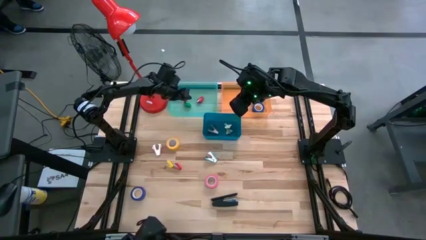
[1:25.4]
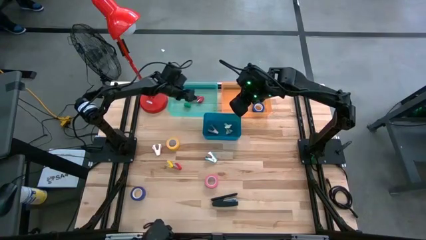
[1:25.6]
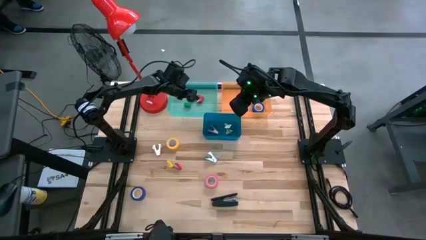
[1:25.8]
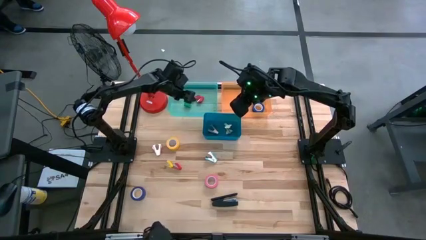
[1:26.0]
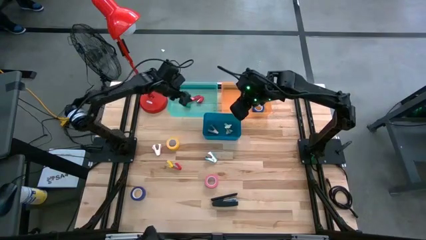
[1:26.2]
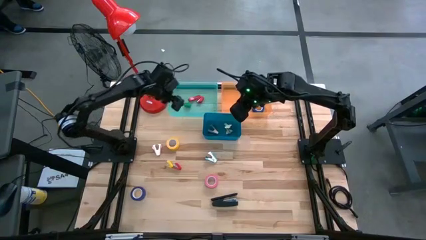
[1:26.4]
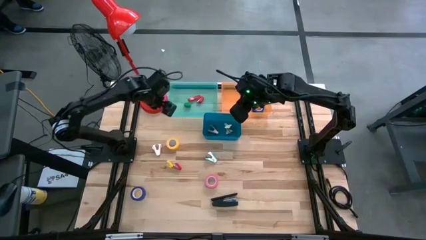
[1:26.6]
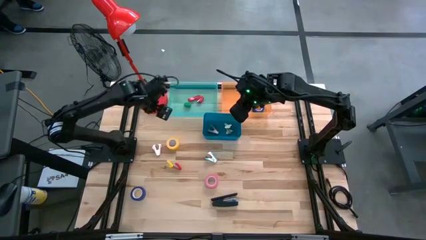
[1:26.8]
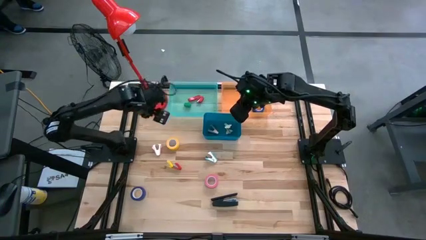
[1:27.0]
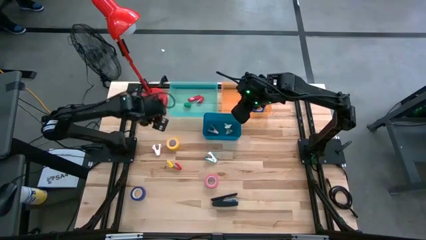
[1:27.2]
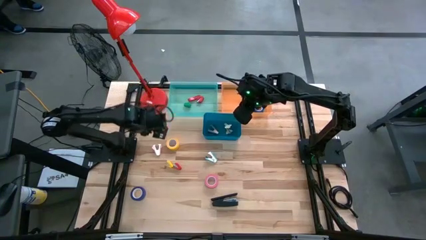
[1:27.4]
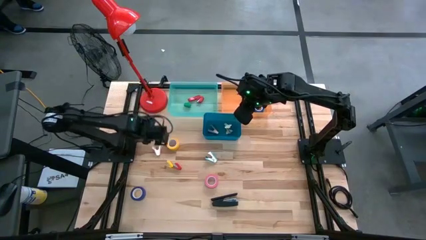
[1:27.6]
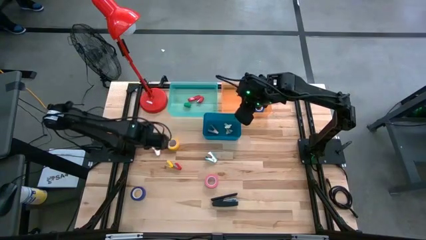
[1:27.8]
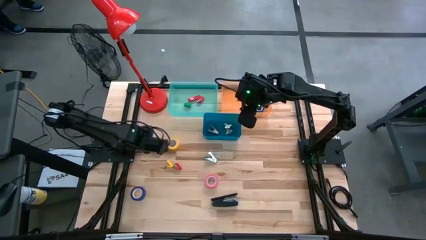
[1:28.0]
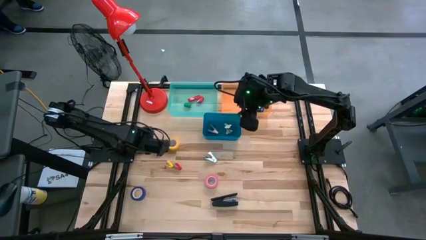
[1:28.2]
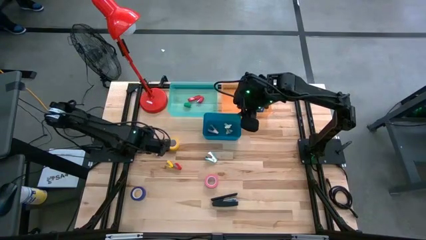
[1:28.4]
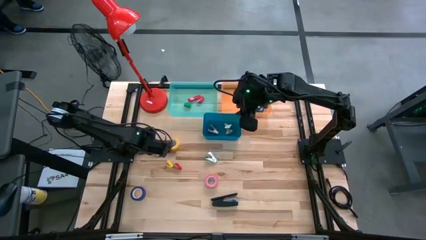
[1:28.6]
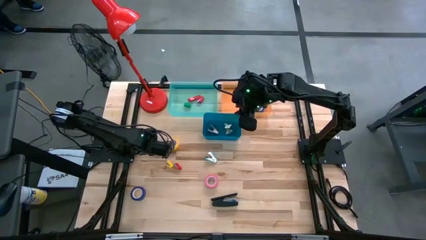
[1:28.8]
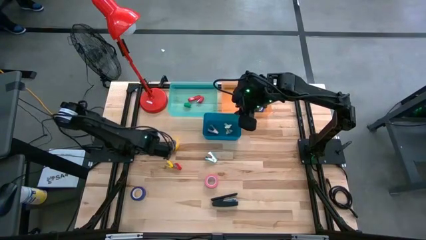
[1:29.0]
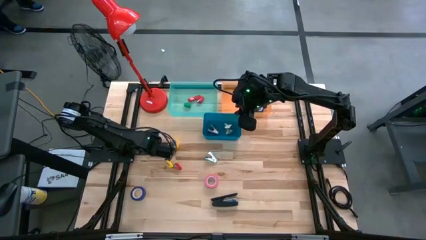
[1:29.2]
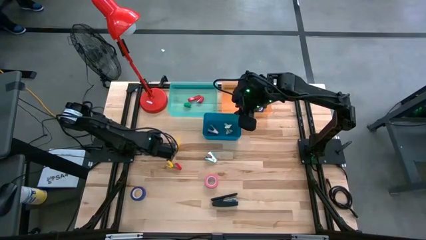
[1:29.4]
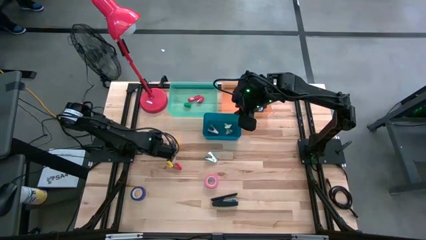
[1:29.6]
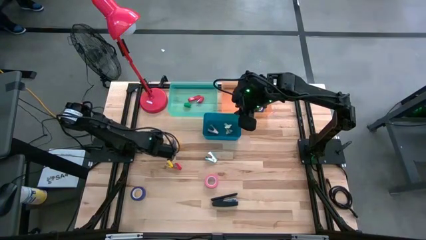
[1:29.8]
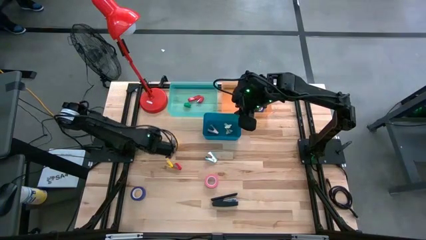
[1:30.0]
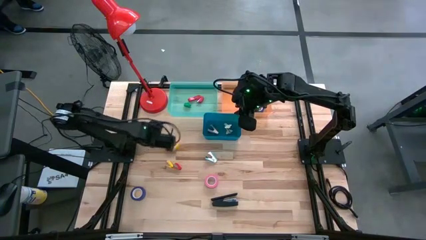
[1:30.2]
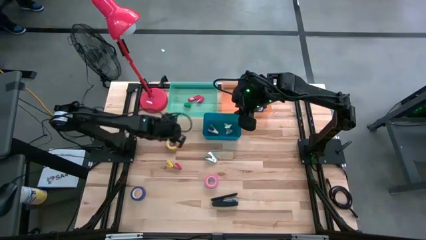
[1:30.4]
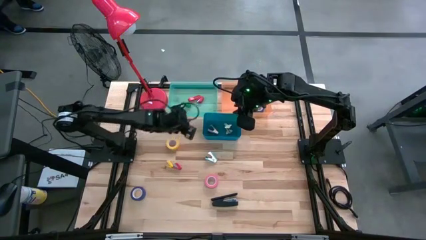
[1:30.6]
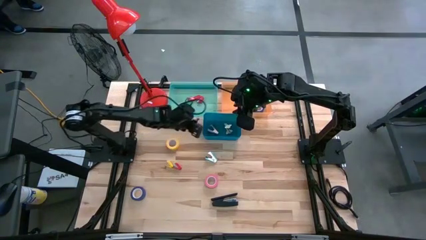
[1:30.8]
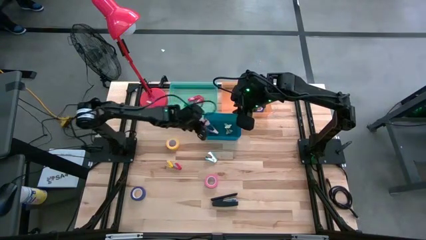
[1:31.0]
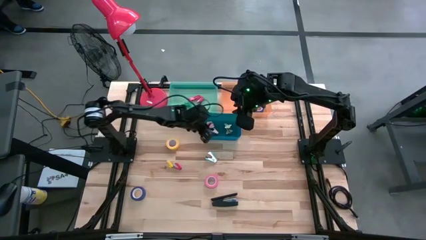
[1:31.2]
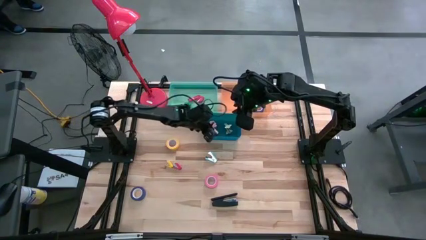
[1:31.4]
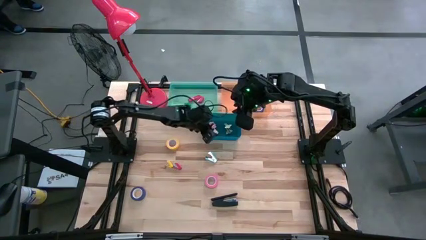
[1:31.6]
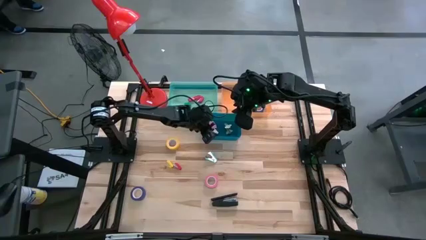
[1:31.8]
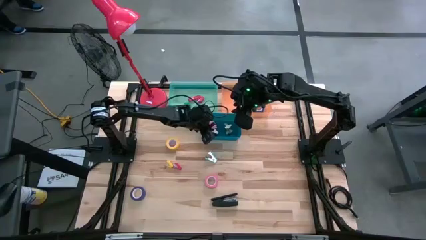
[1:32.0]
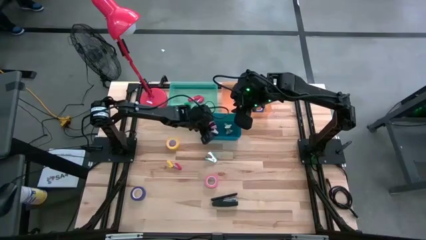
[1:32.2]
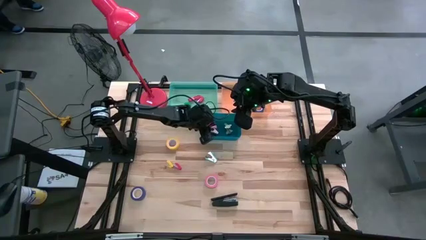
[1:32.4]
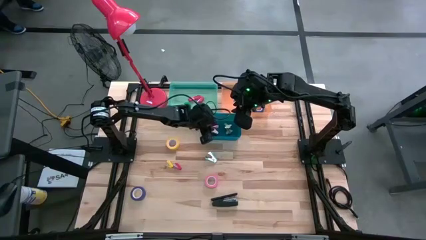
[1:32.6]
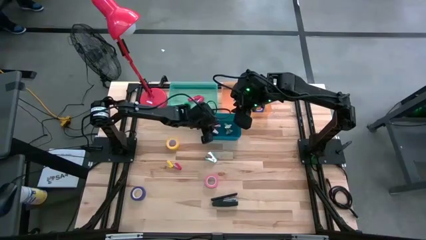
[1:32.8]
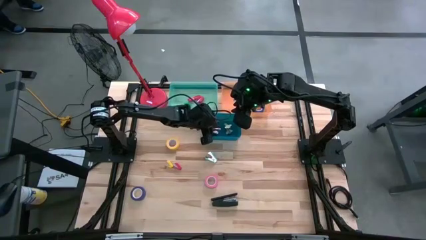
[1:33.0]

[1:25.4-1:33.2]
Task: Pick and place Stapler, Stapler remover, tape
Put the pink staple remover into the blue bin

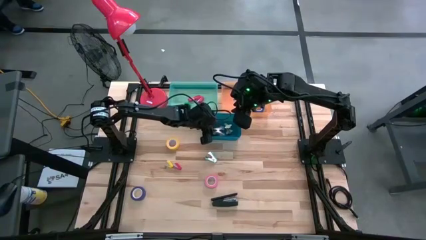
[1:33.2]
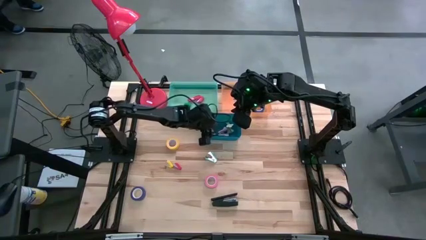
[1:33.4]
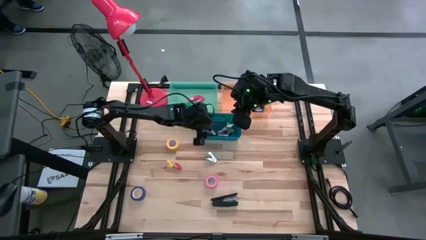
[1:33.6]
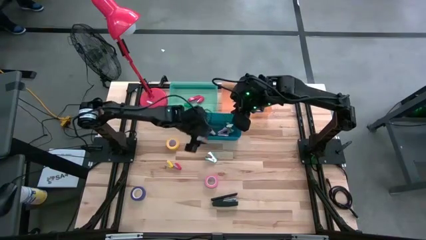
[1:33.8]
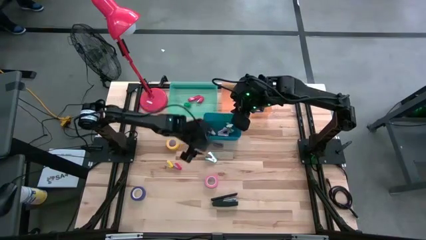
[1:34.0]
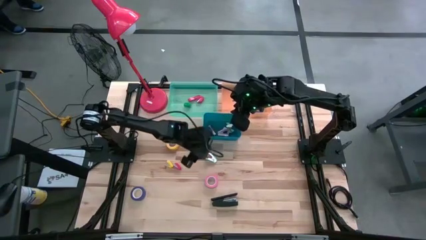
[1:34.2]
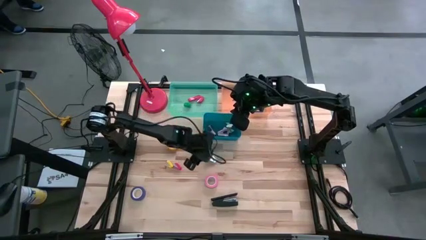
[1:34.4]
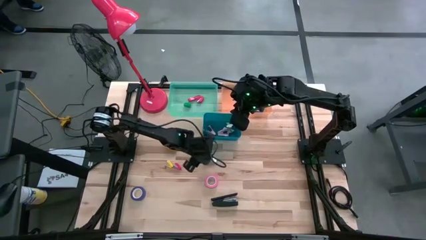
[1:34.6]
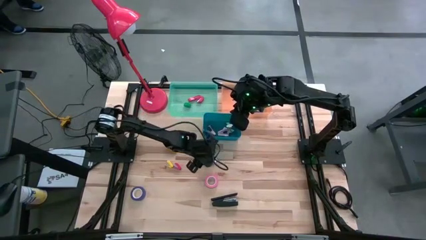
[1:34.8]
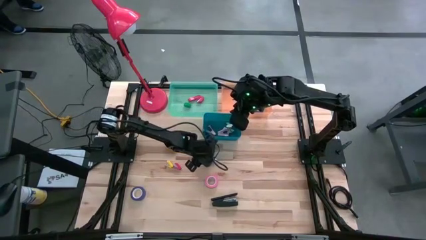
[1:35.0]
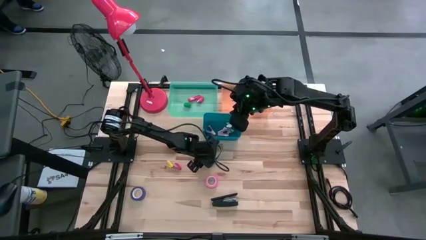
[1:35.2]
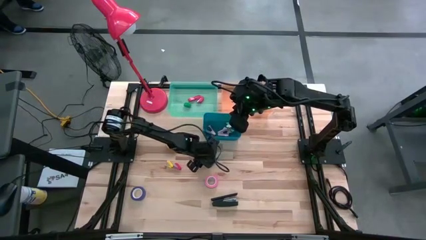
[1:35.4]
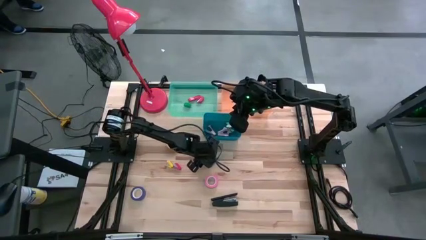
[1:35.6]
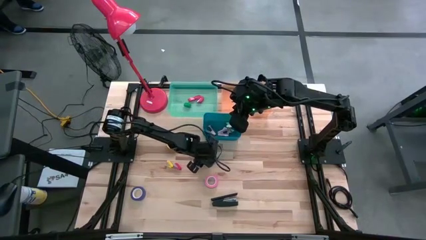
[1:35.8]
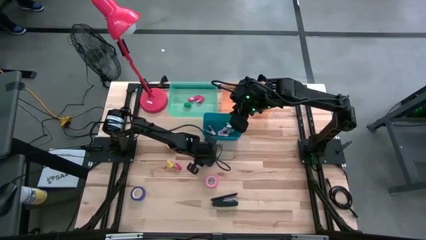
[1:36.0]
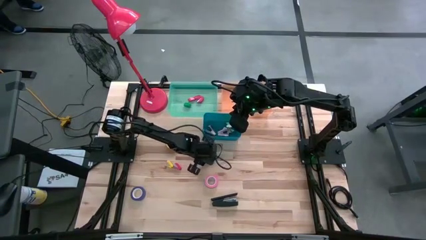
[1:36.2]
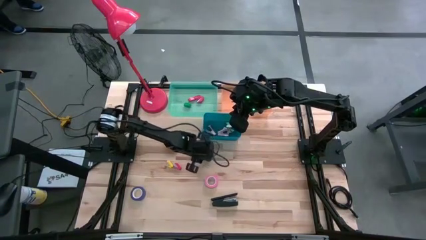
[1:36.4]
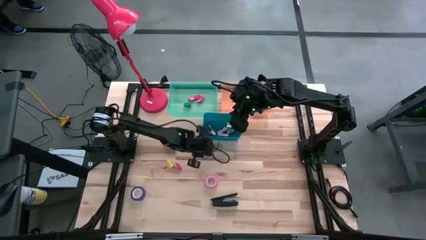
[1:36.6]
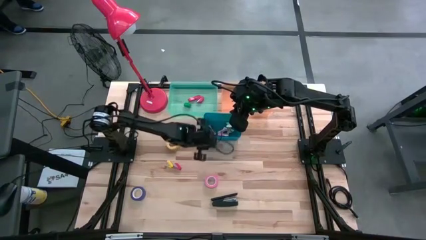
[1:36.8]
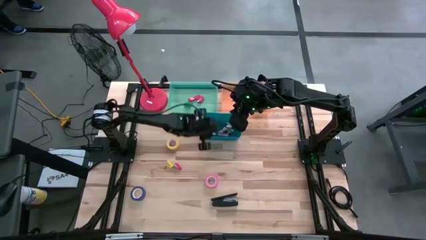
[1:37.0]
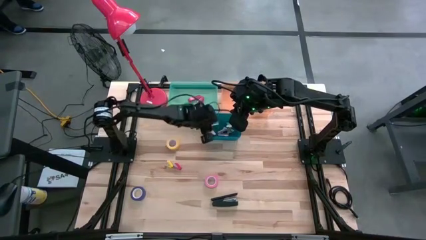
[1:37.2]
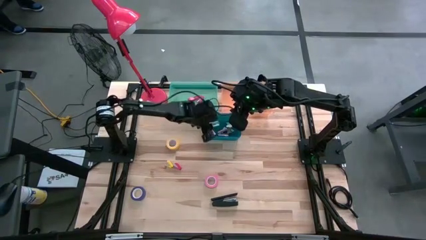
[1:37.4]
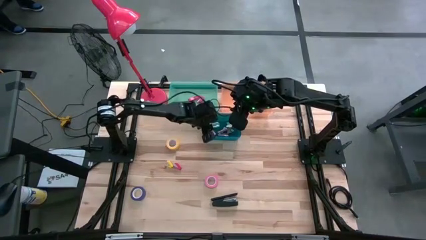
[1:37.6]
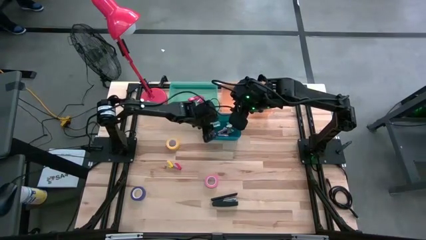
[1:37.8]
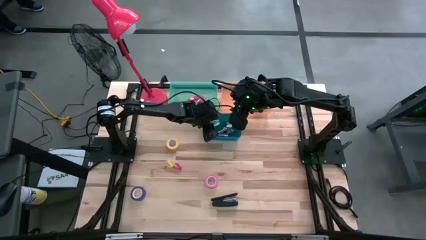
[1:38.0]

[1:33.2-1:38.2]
Put the light blue staple remover into the blue bin

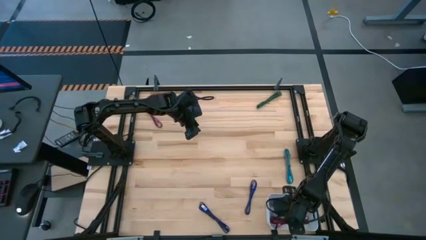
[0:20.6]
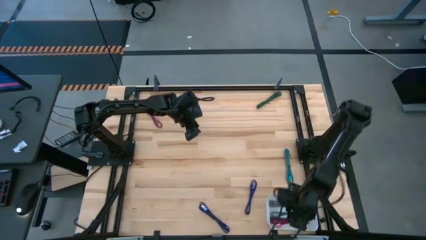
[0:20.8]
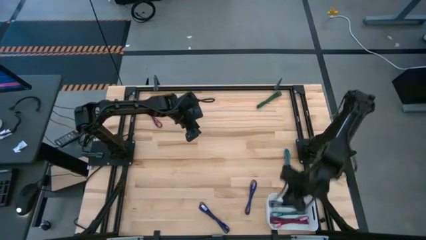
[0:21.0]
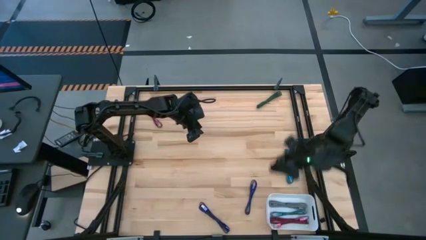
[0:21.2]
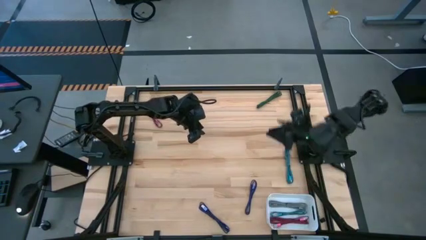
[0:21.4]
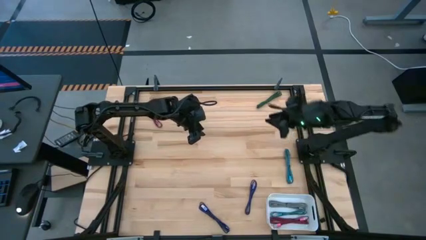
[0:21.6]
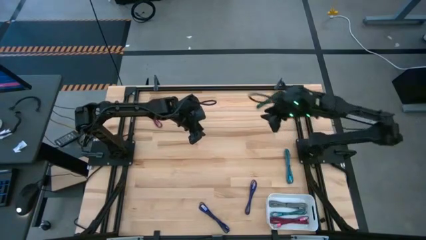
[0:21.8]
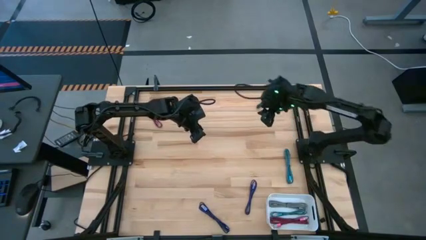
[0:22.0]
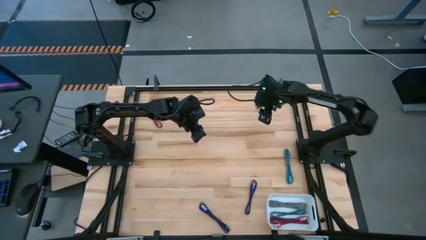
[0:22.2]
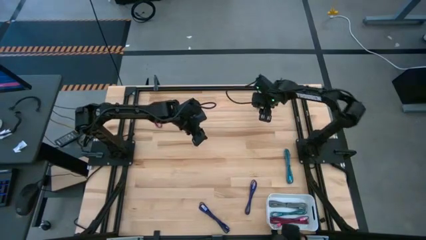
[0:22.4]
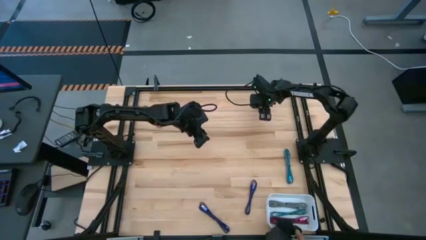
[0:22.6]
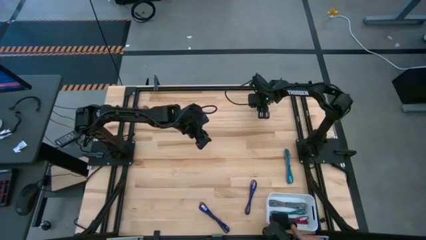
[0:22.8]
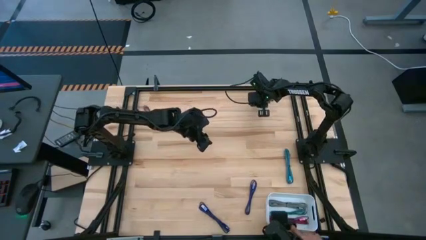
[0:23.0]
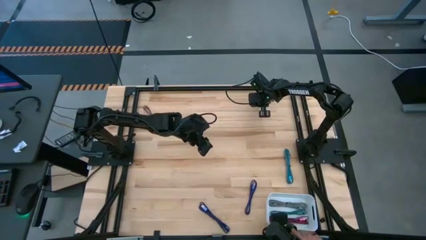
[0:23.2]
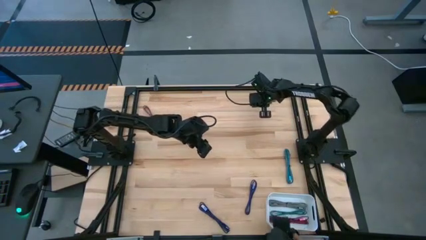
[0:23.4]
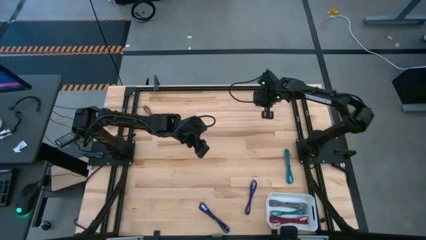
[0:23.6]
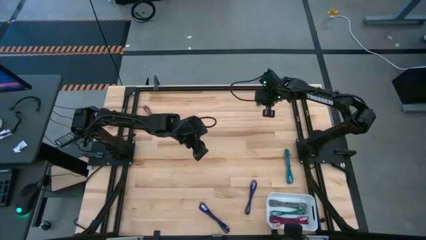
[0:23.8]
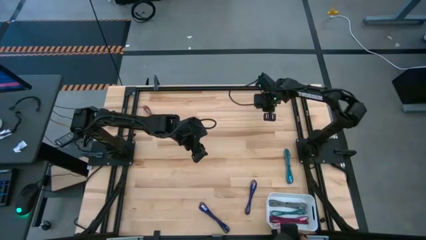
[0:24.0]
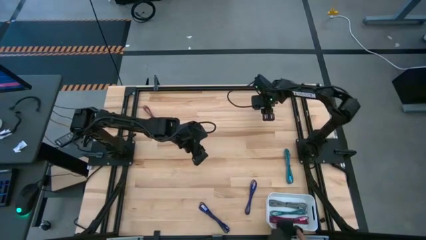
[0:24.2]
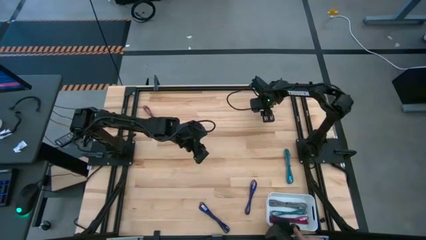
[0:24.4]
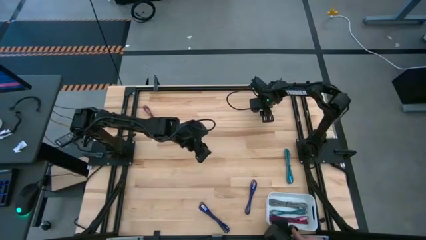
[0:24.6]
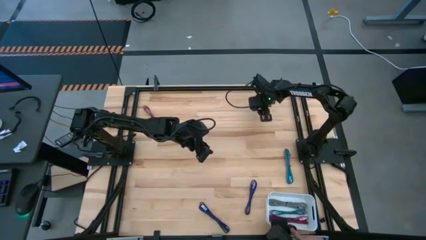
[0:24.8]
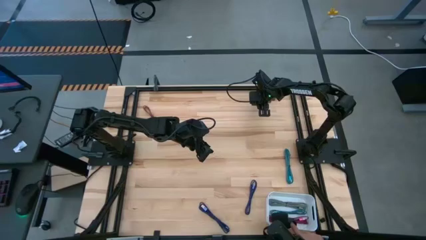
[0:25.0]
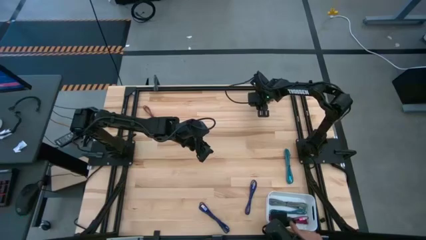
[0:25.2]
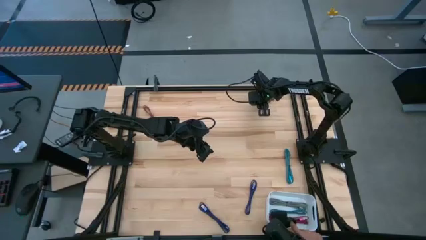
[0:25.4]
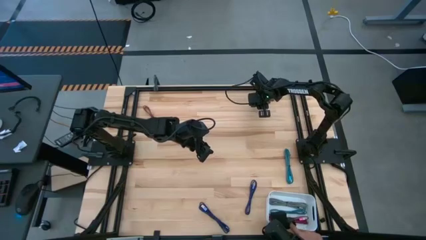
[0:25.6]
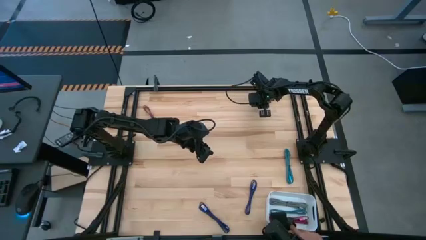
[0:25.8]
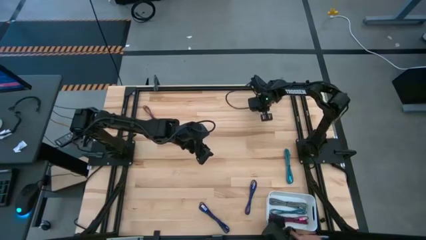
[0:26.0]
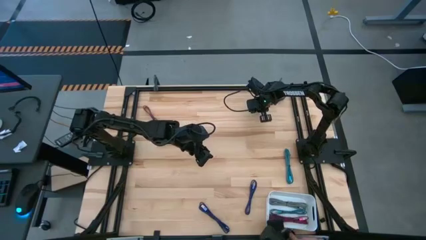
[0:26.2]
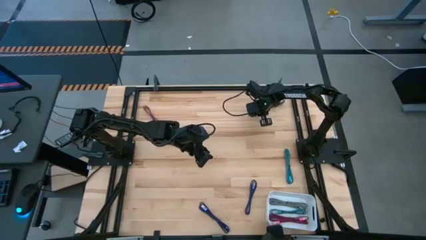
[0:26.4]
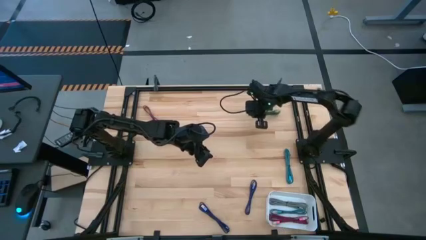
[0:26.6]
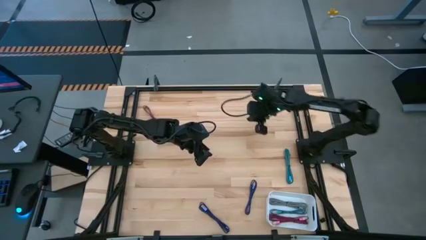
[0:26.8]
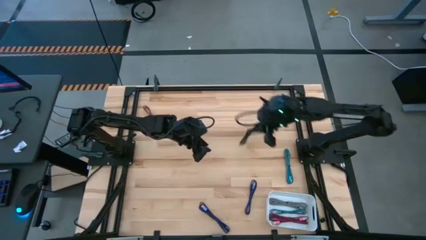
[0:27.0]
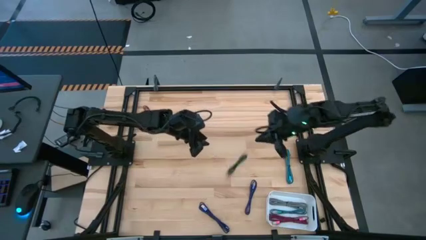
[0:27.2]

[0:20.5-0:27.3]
Task: Pick and place USB-C Cables
Put the green USB cable into the white bin
